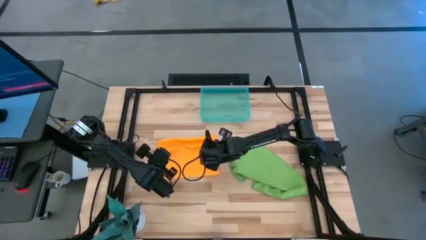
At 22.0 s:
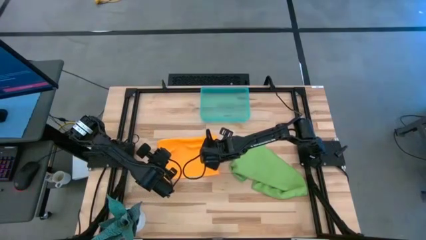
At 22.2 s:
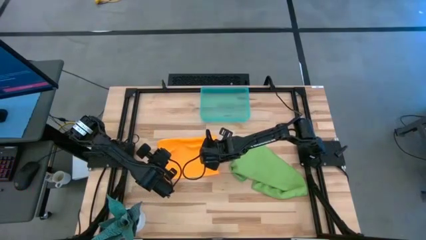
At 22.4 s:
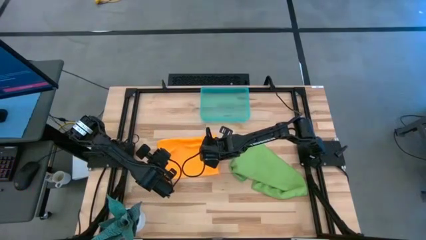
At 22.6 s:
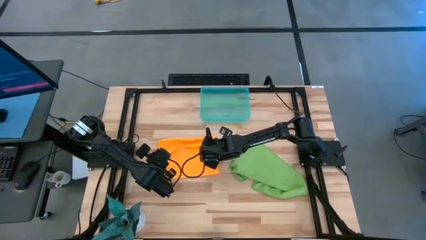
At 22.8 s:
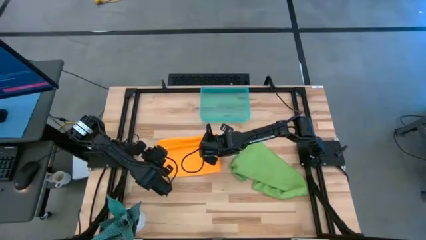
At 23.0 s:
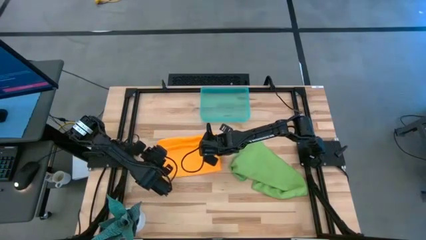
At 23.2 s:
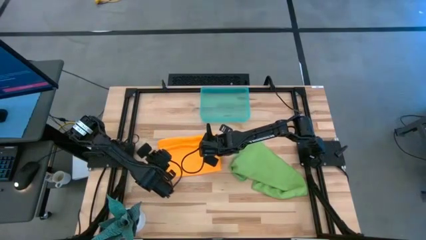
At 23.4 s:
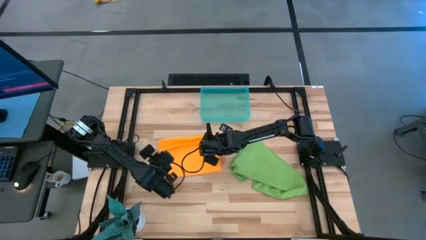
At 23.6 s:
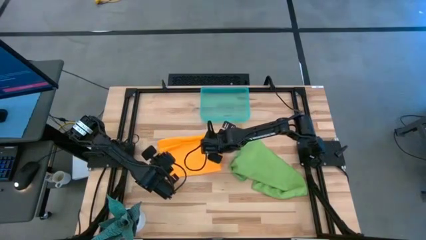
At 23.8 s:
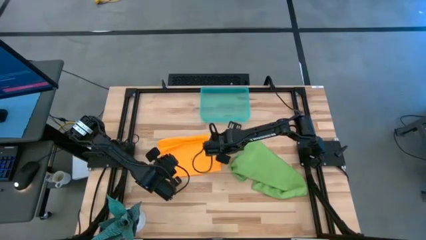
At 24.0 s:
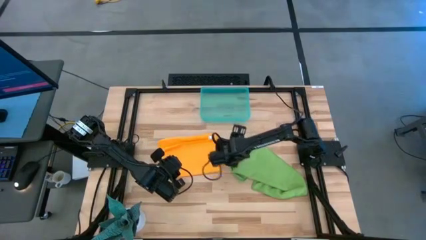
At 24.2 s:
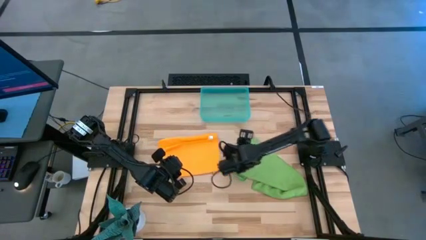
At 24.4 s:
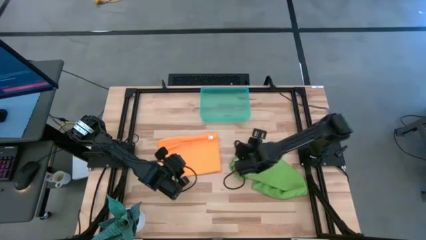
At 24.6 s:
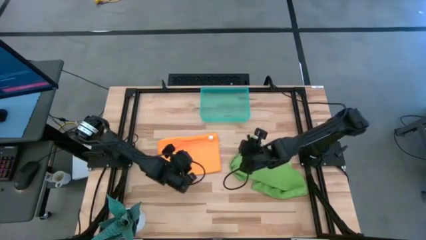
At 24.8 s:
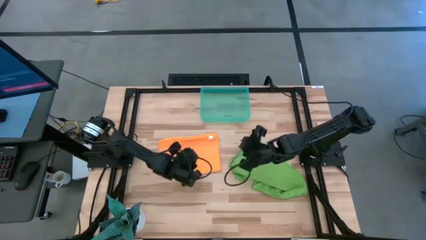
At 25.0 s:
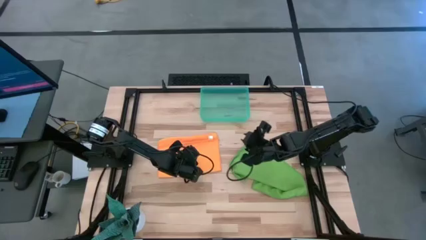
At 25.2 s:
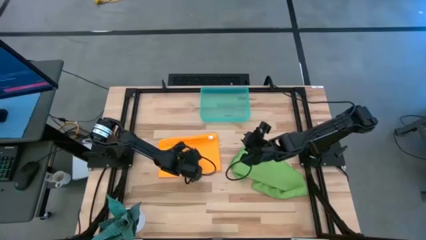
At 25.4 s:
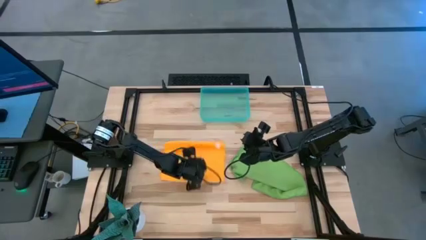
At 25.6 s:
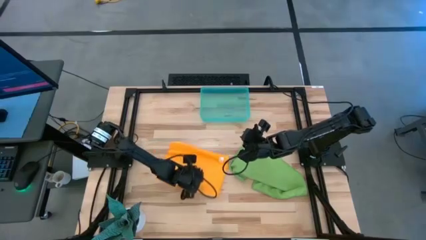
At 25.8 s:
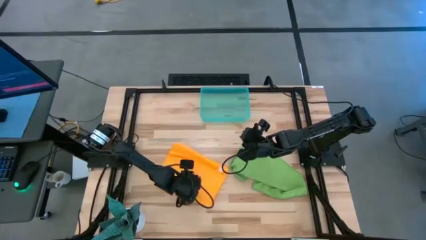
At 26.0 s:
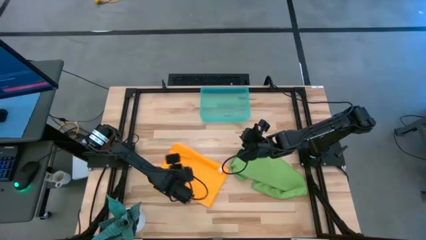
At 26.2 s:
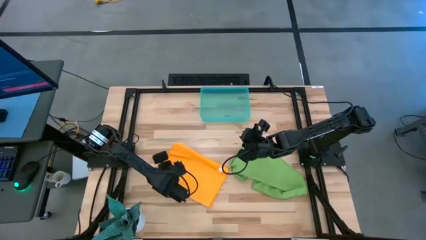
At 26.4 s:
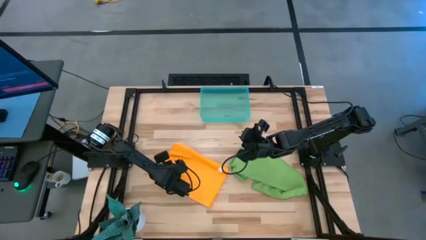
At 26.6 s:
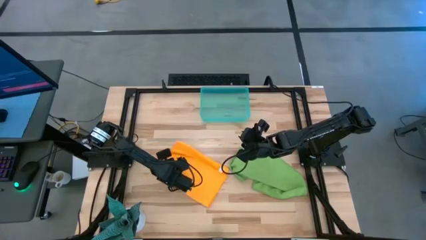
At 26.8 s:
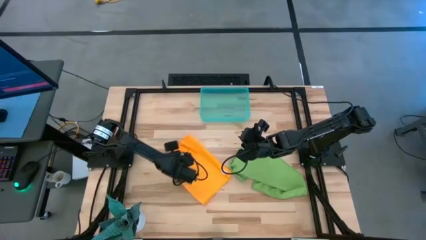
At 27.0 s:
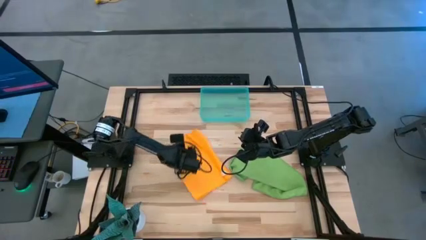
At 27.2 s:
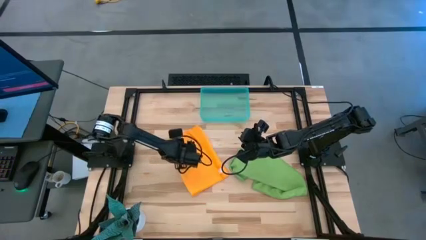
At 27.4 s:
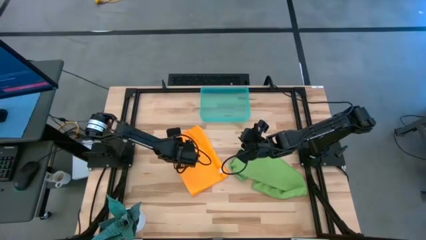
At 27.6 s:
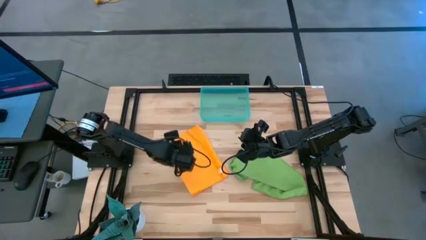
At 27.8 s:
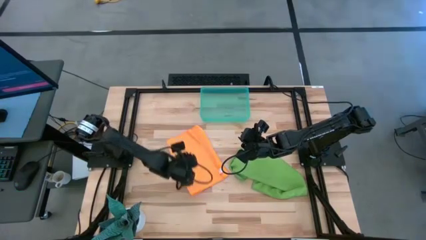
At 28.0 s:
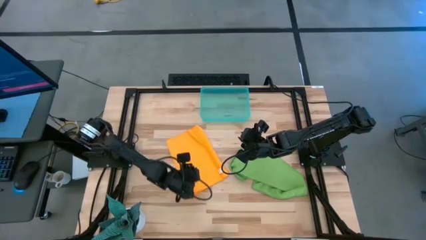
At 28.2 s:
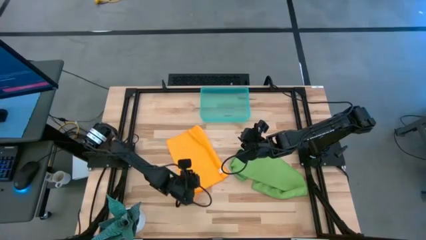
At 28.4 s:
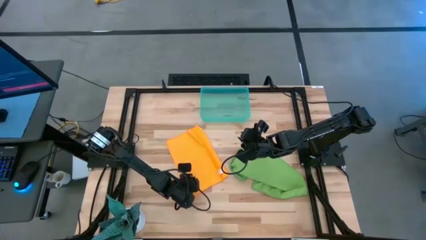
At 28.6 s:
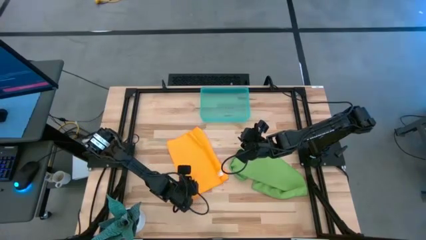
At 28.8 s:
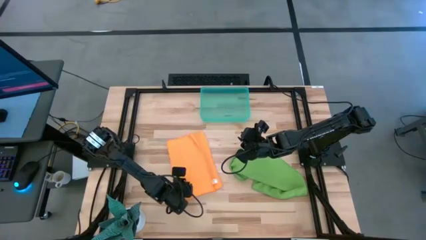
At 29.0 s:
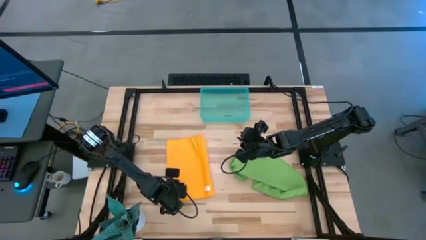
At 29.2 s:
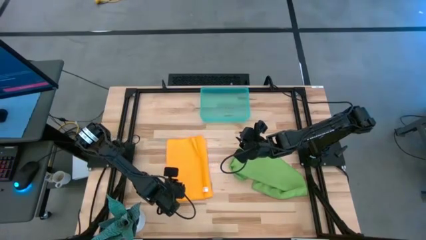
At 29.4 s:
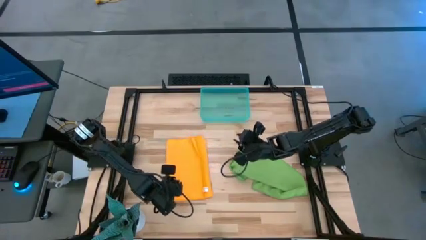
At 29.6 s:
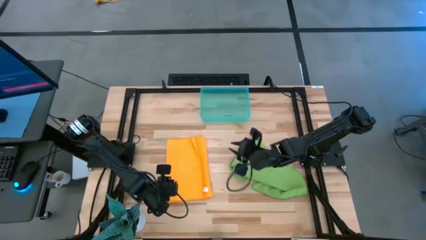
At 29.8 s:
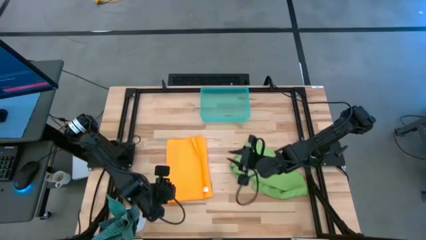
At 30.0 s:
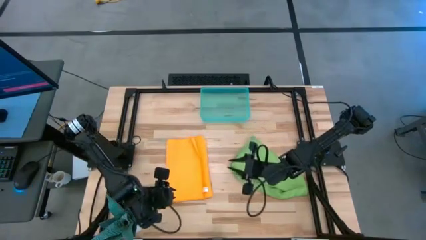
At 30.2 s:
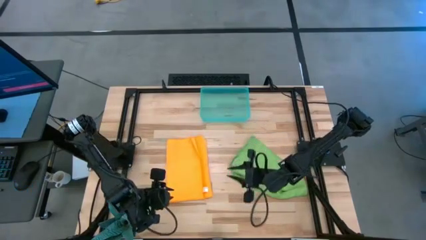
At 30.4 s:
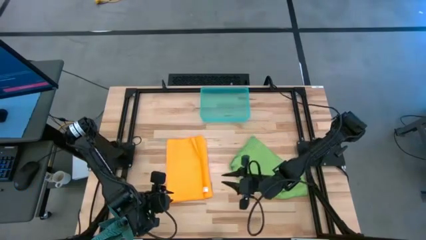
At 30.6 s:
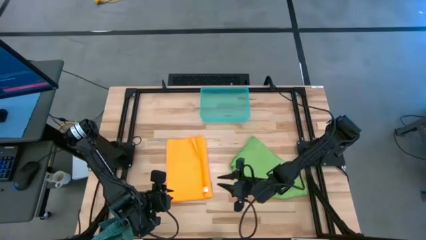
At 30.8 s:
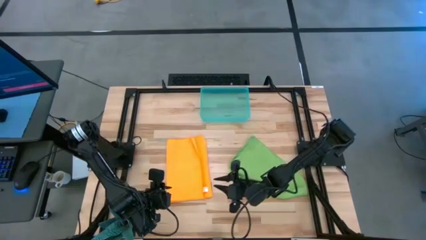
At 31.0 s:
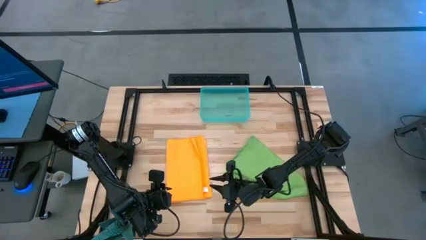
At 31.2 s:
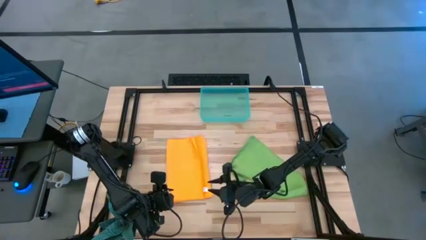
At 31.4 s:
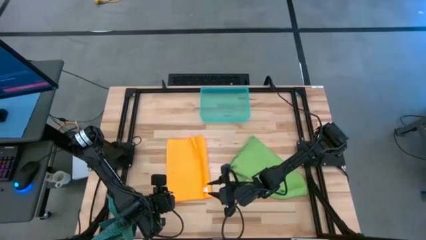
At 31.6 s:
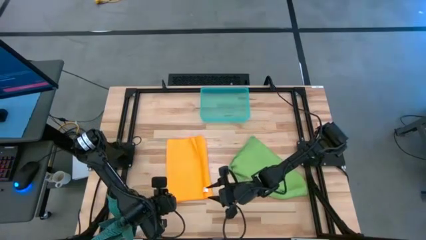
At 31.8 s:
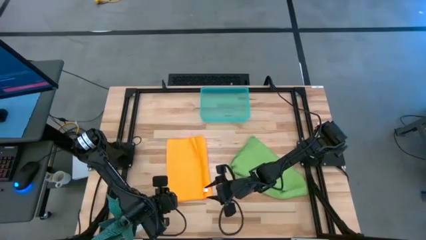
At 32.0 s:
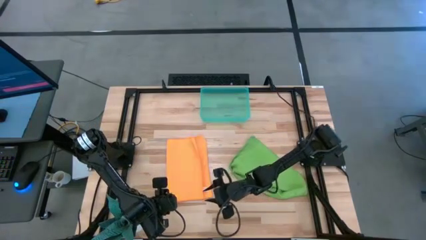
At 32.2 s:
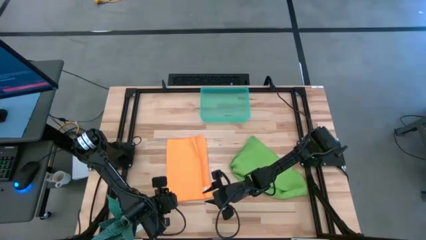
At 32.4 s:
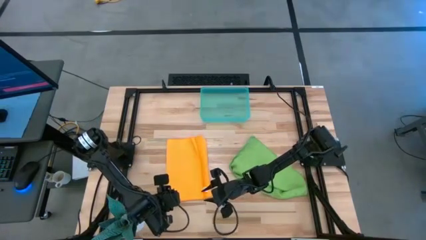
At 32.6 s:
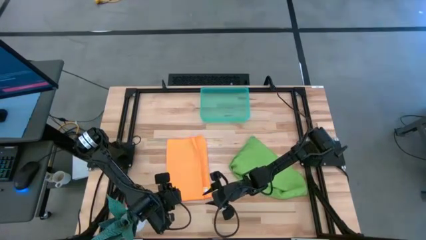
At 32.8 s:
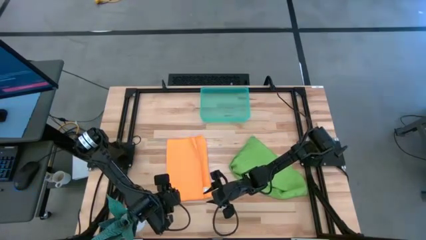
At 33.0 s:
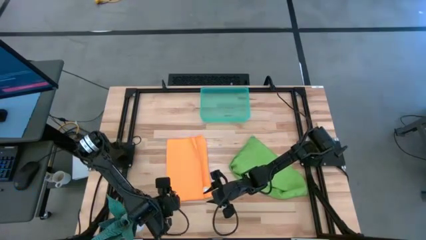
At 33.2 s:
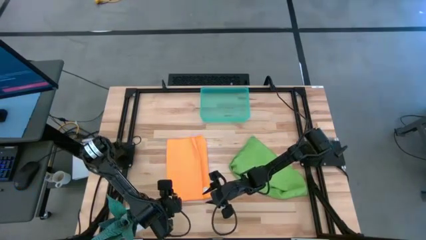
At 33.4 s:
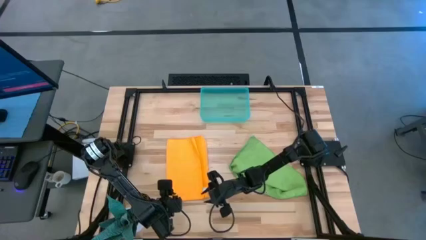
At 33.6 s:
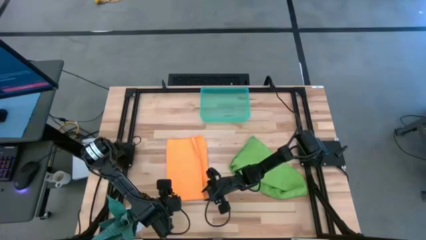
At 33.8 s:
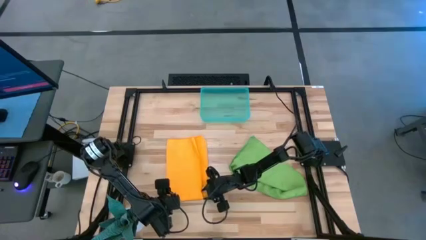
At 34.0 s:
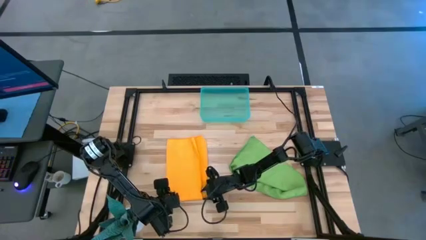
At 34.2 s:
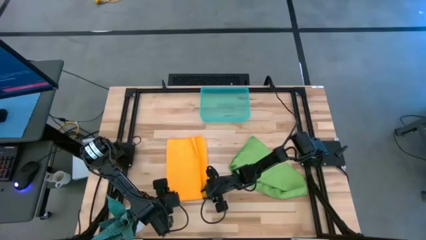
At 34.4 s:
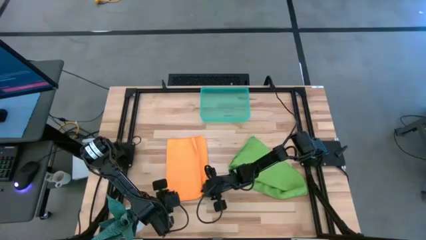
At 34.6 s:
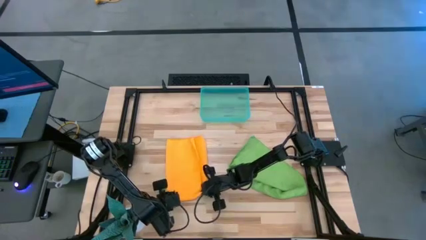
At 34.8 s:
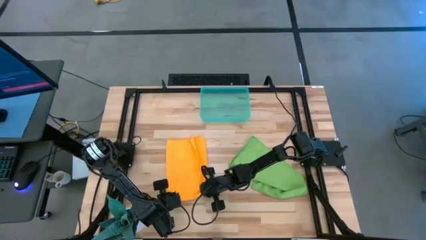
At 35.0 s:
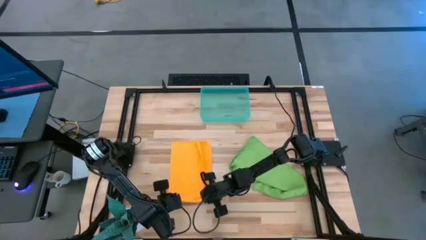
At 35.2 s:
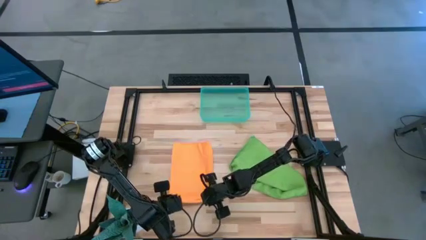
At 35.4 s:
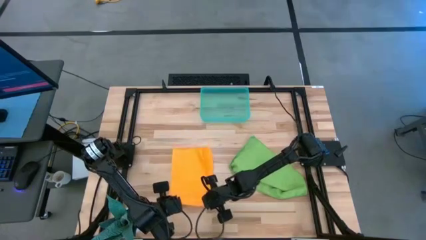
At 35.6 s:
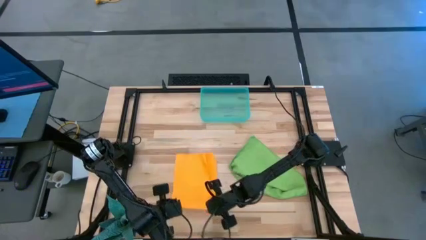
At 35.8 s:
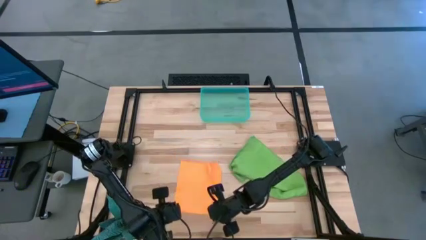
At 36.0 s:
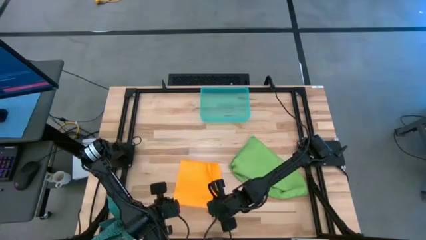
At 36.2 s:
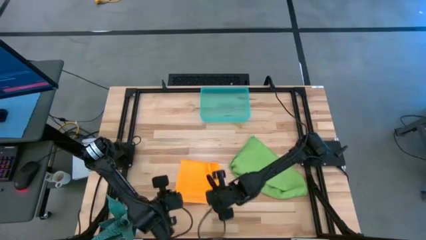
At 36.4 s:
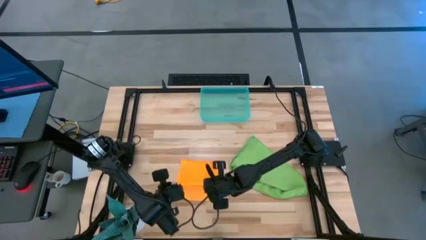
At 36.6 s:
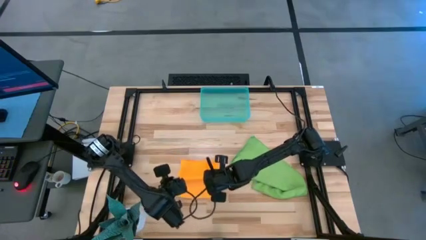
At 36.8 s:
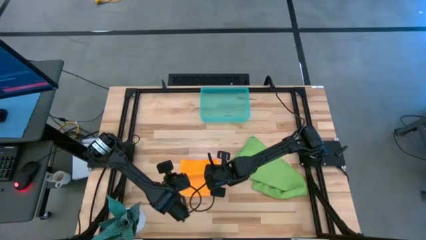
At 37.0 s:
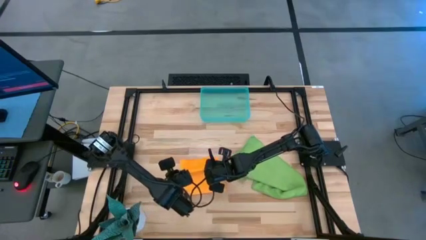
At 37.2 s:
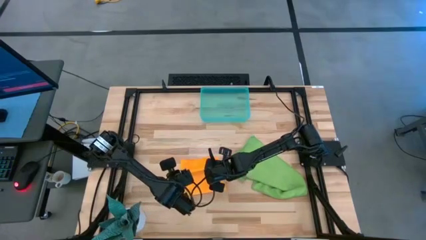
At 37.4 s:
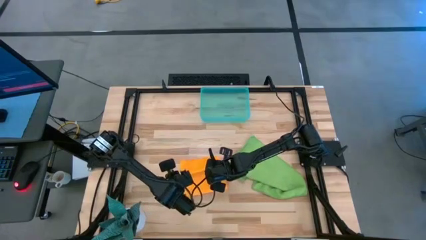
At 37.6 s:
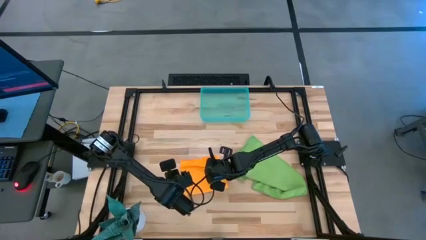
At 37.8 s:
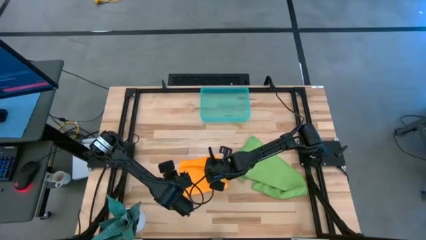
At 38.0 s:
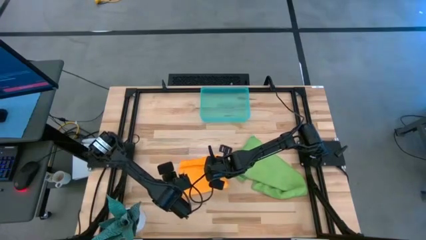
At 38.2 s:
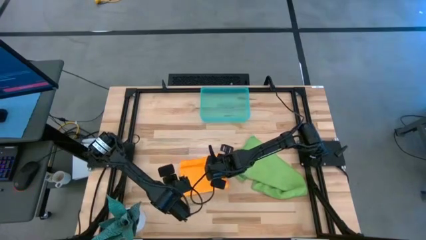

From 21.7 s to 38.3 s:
Task: Roll microfiber towels into tight, uniform cylinder then place into a basket
Fold the orange microfiber towel
